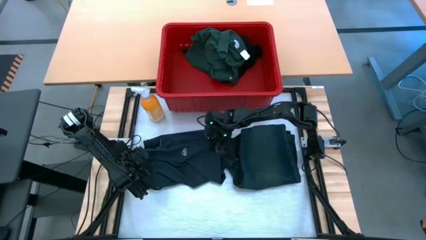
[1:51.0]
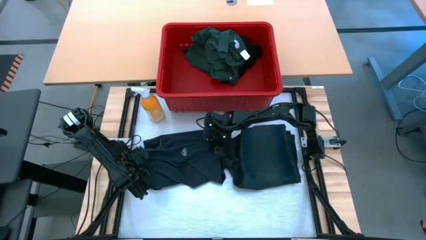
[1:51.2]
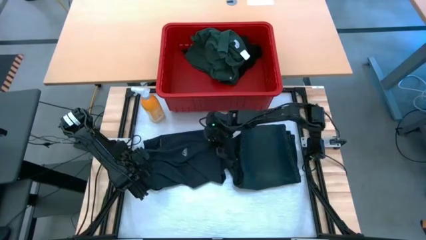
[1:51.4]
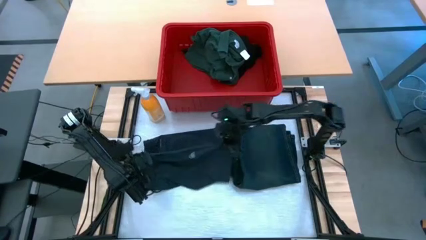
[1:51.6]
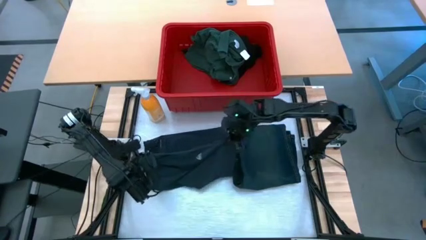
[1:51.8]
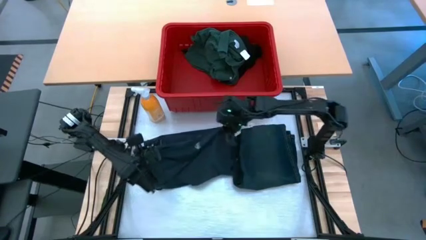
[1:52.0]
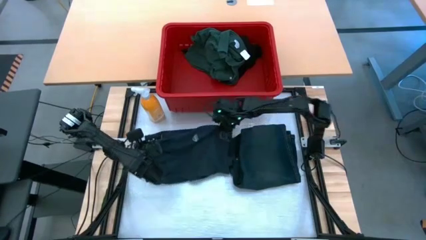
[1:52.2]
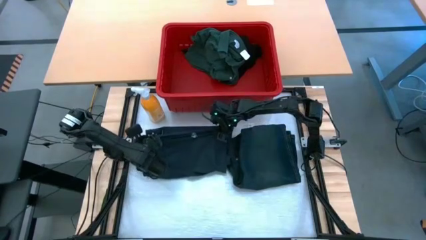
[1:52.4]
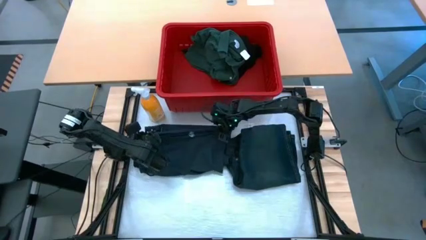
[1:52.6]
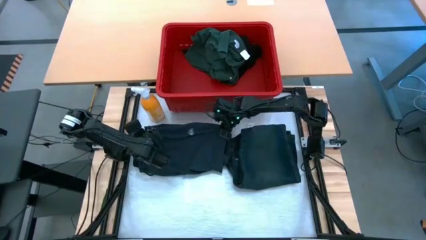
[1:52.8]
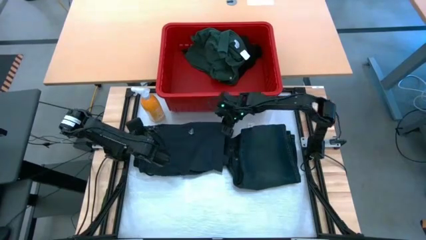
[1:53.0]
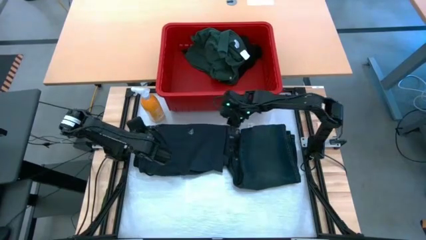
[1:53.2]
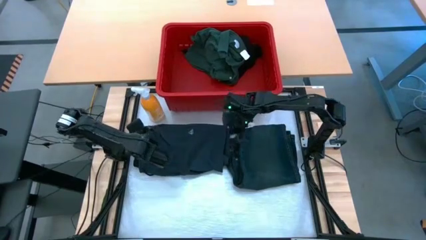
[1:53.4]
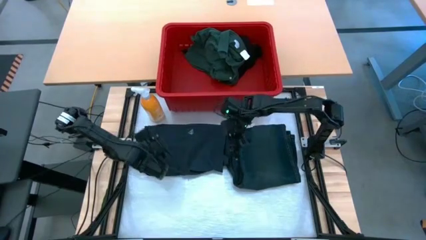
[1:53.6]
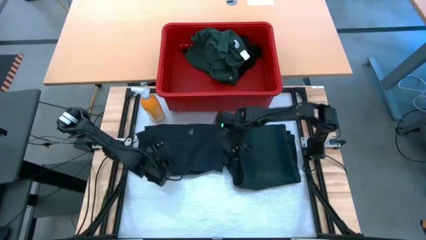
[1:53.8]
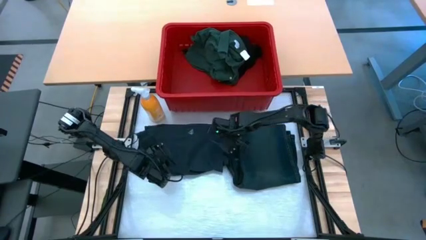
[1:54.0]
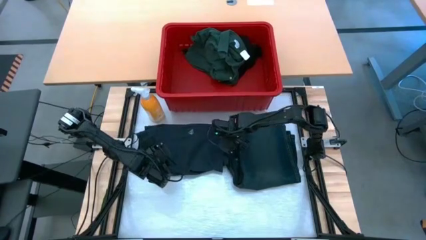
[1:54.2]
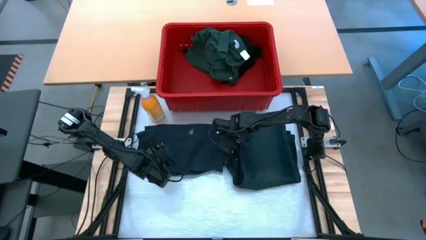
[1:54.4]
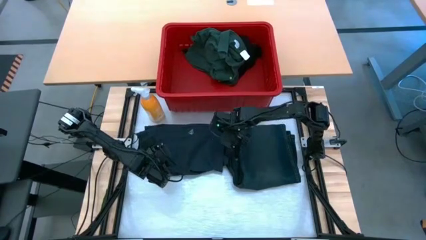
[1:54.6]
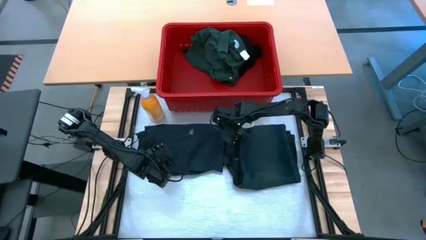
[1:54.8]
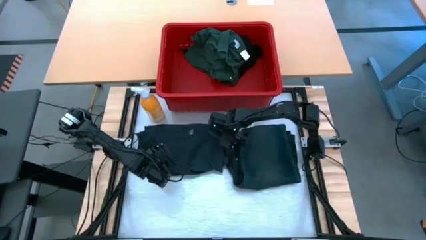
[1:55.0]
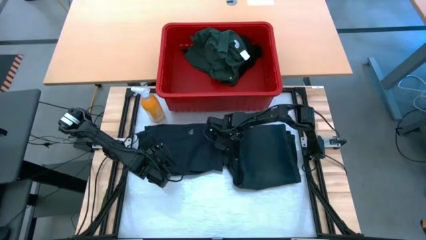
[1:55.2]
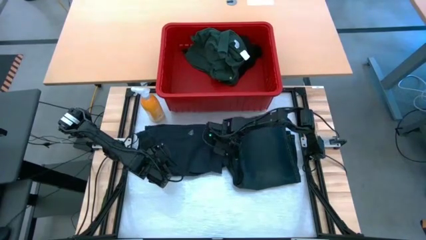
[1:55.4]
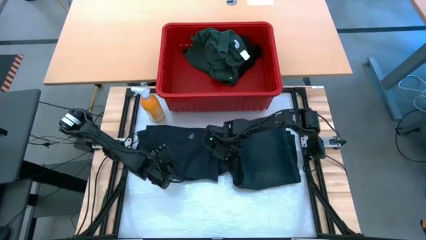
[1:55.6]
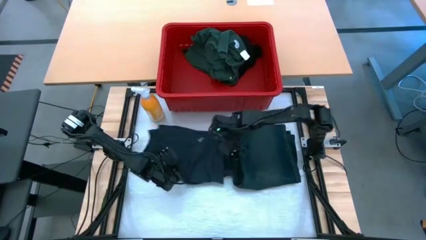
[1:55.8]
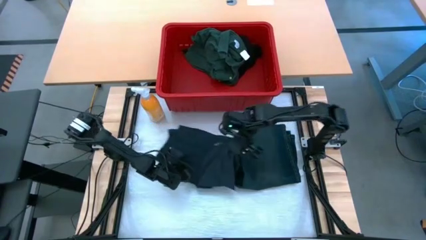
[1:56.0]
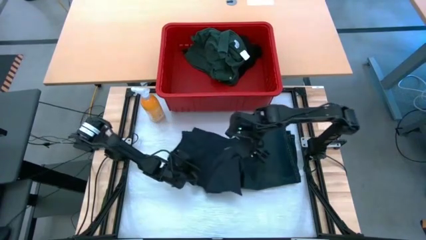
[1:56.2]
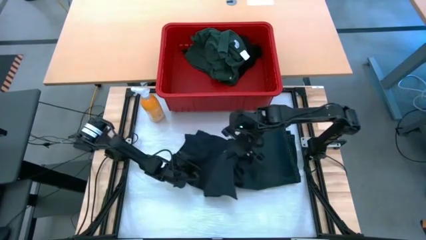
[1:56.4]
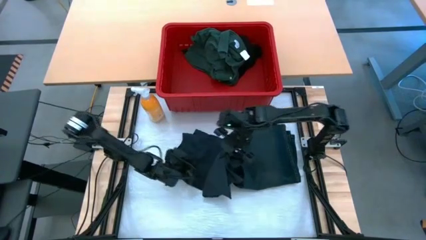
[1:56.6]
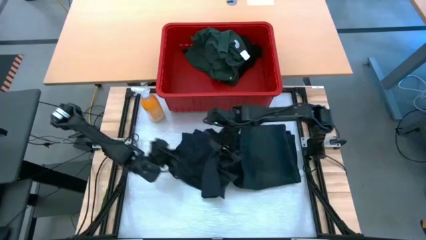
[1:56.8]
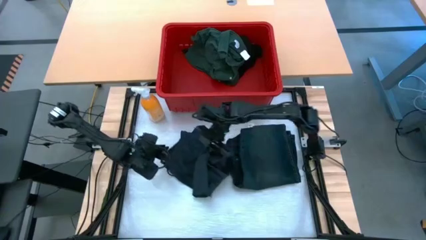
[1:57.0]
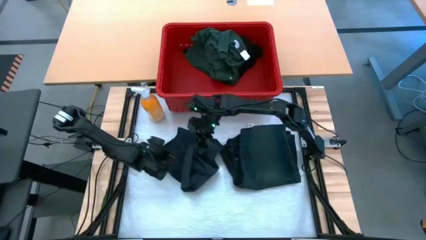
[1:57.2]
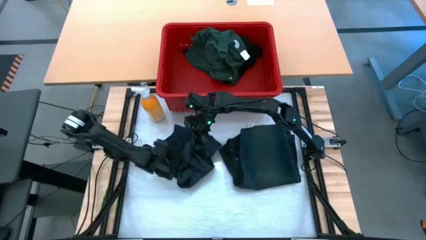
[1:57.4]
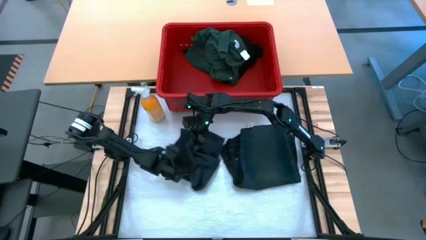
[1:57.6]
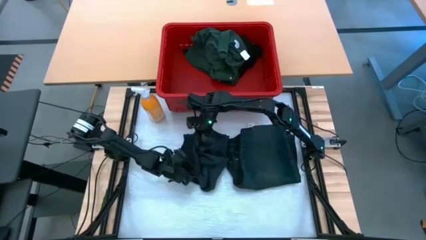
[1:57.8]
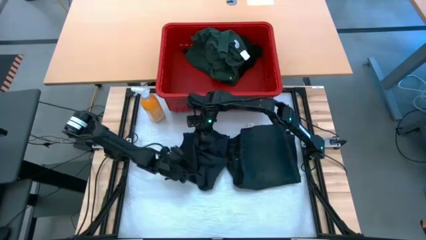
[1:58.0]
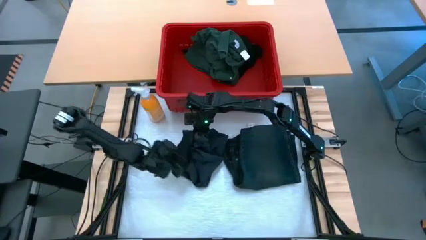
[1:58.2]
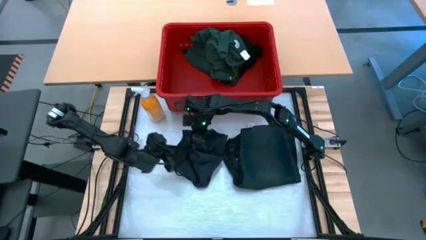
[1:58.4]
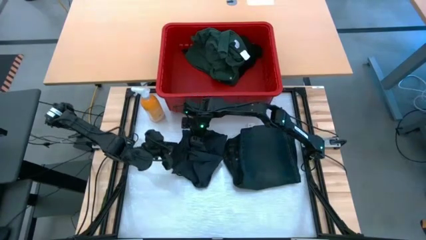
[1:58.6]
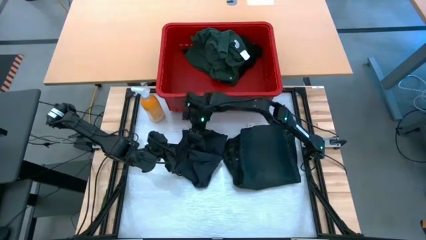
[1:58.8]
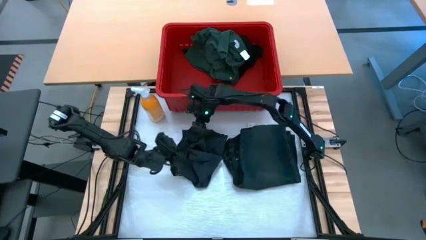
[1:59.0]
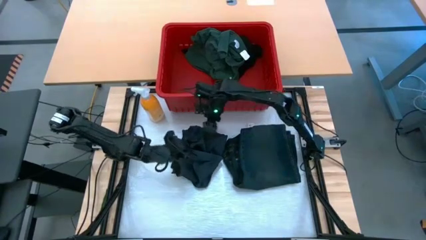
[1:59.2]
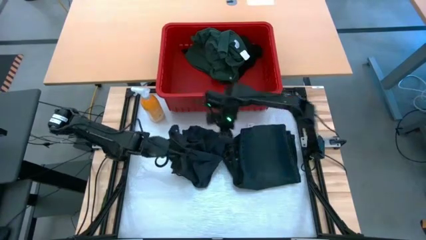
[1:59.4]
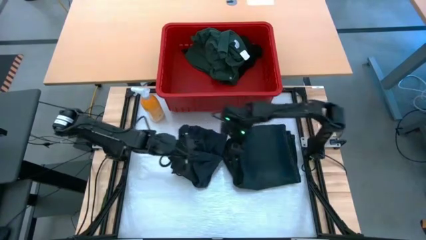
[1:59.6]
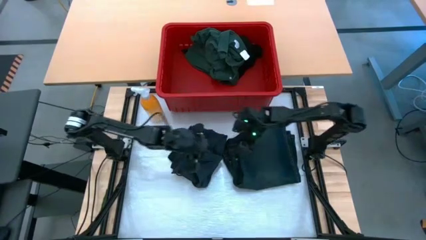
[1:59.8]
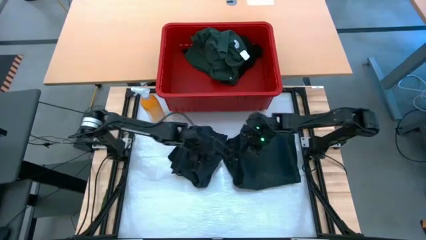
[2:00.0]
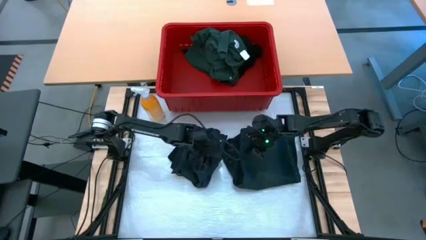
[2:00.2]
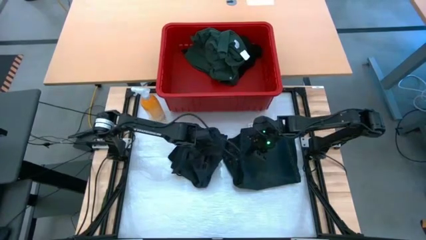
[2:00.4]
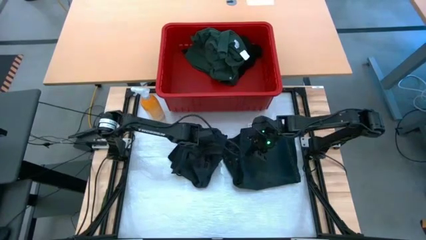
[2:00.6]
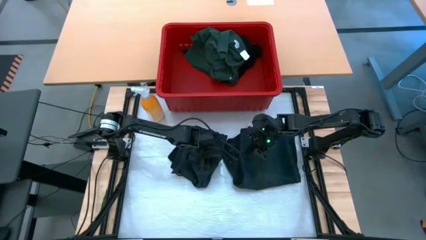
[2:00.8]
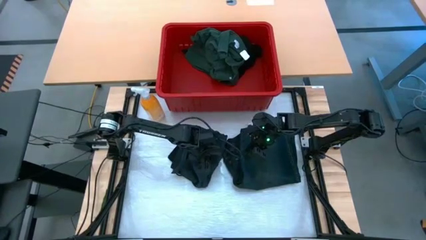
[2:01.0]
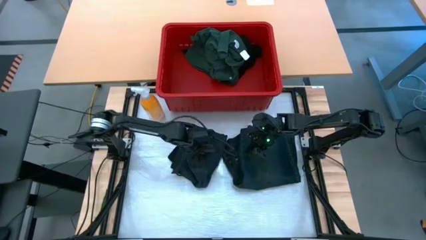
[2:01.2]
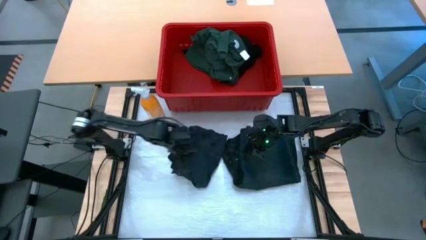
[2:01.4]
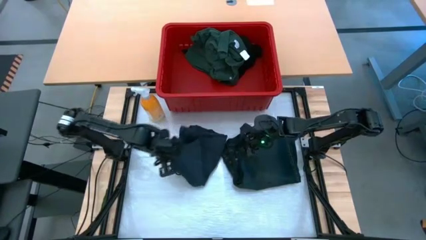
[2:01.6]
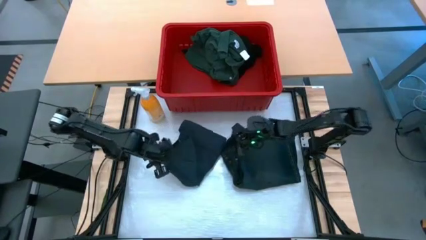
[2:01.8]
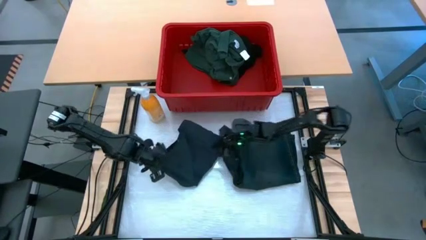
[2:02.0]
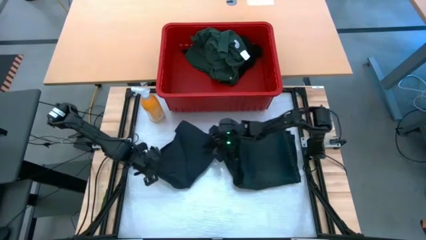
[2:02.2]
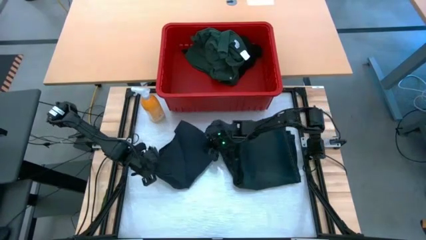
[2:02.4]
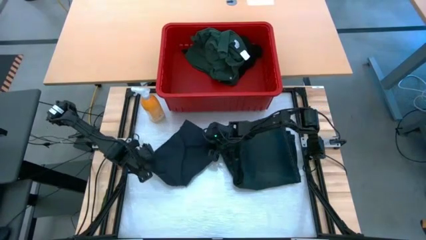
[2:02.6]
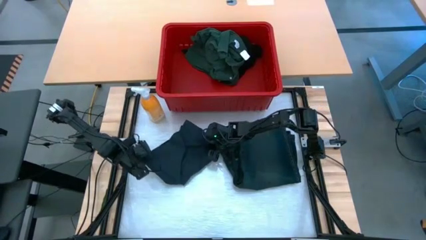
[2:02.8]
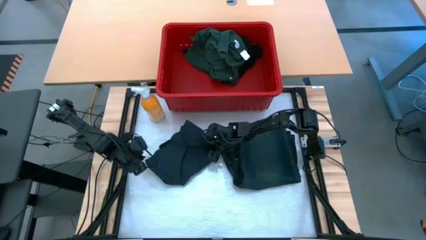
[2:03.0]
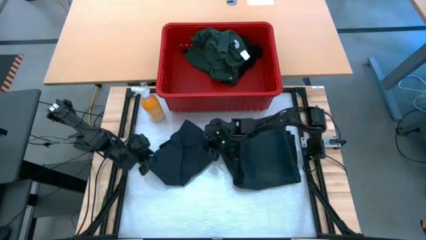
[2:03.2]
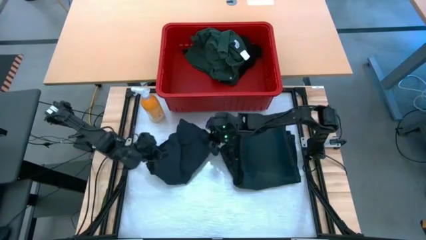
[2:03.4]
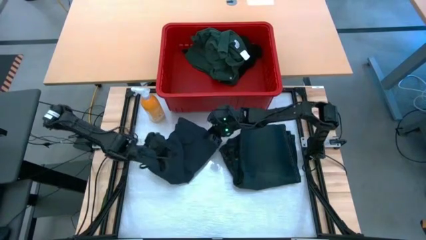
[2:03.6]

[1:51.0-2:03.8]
Task: Fold laundry
Fold the black shorts

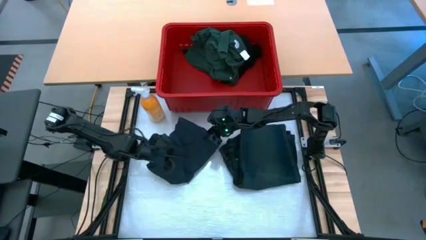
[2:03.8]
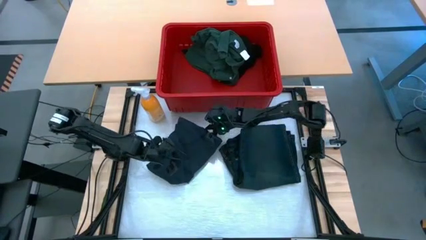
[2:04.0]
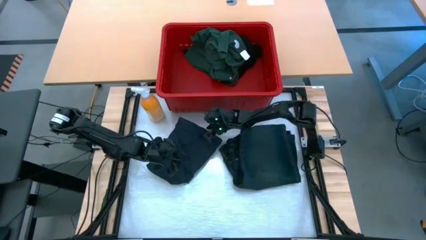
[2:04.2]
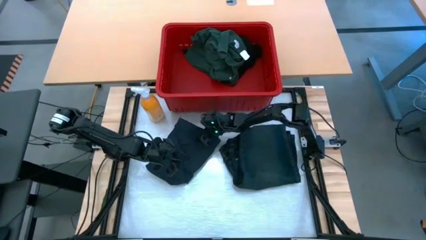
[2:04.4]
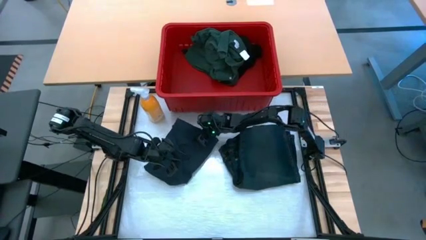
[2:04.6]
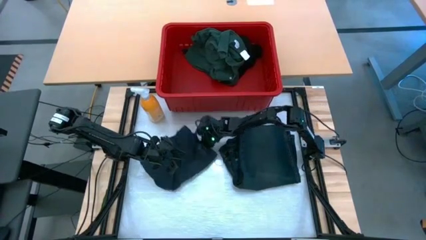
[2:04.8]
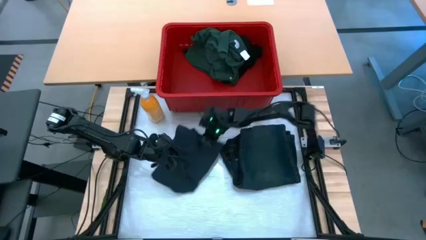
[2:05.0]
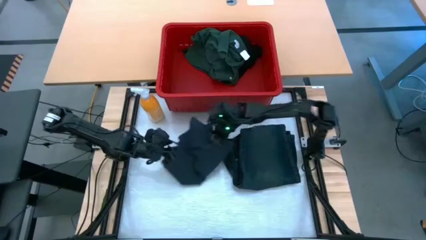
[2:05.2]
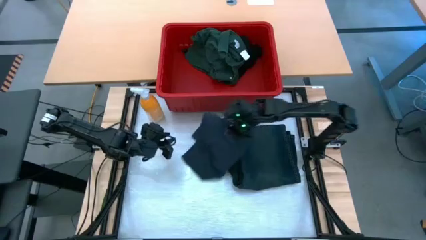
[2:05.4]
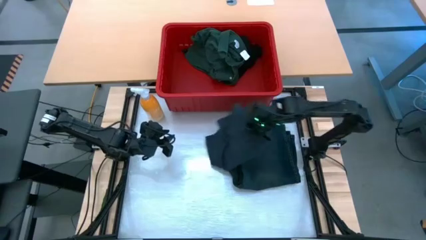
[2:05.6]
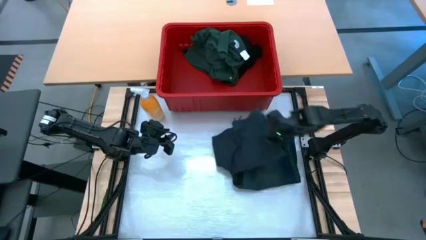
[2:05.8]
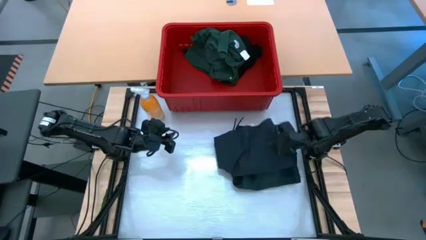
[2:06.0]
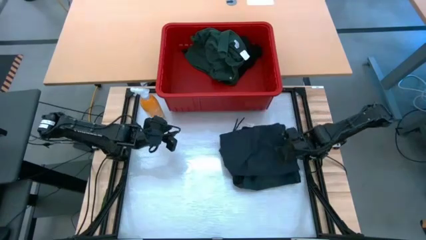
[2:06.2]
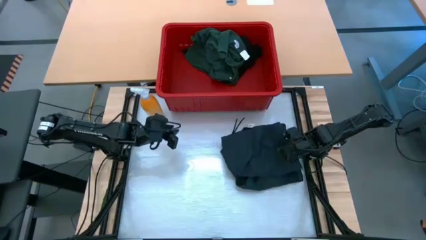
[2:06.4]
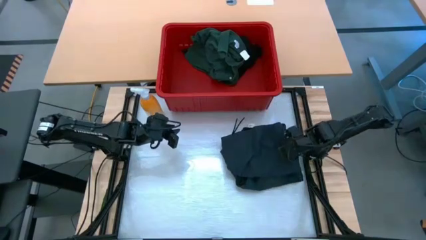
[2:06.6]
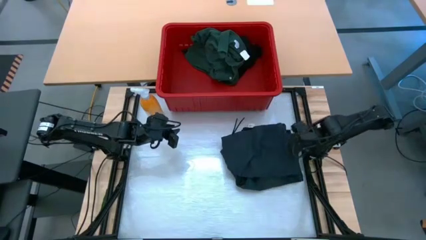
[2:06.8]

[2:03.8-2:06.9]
Stack the black shorts on top of the black pants on the table

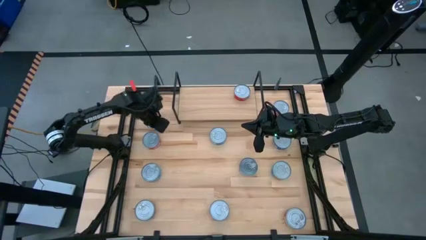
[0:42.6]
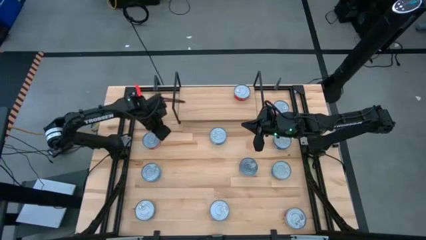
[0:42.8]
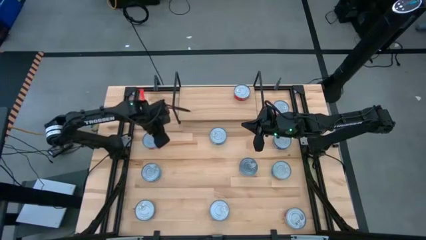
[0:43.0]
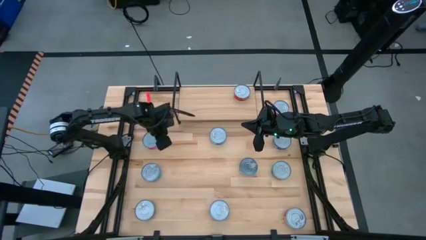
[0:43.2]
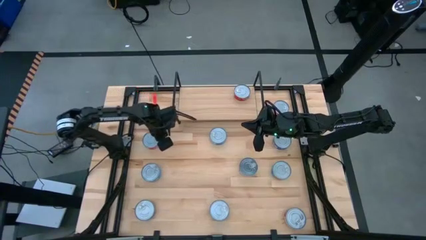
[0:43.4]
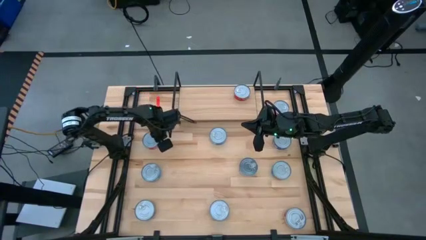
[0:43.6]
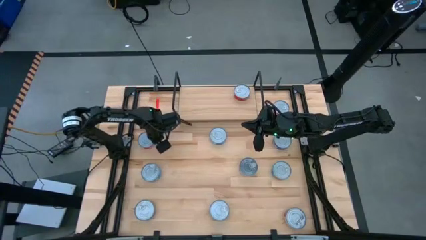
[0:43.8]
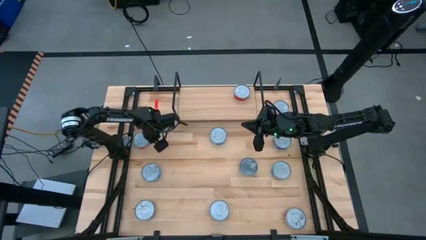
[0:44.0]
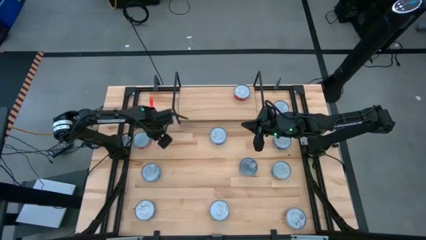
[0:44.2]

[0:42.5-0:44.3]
Task: Stack canned seafood by type on shelf
Adjust the middle left red tuna can
